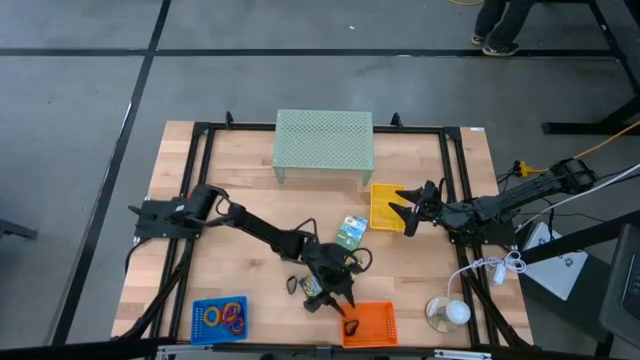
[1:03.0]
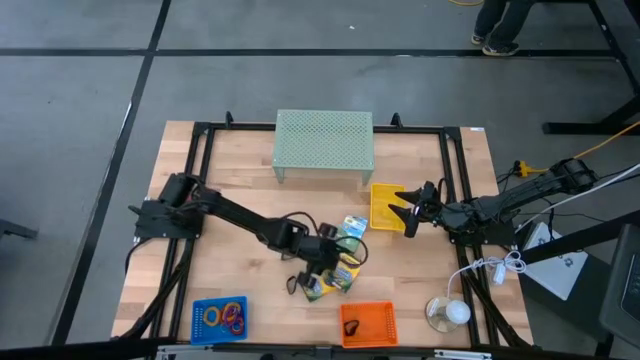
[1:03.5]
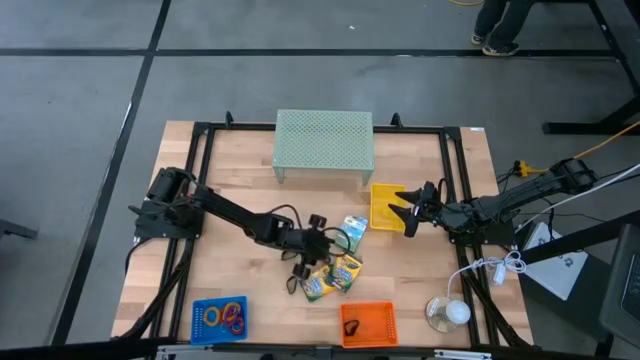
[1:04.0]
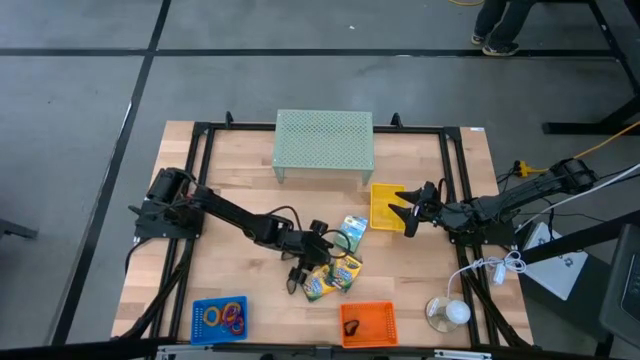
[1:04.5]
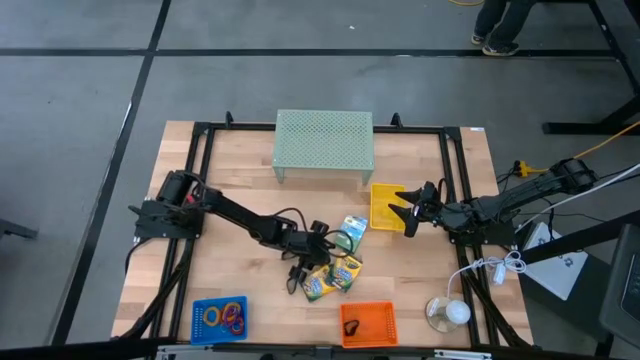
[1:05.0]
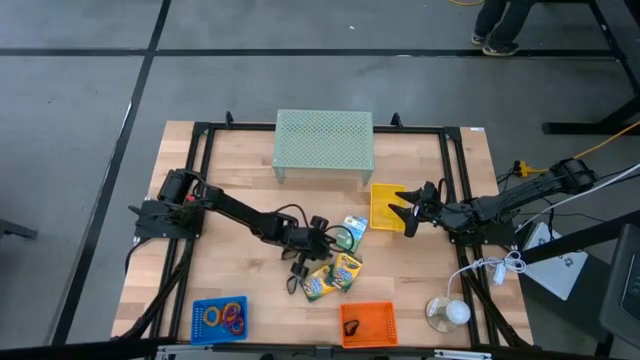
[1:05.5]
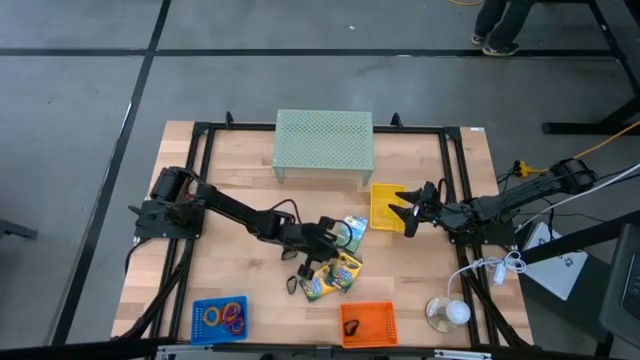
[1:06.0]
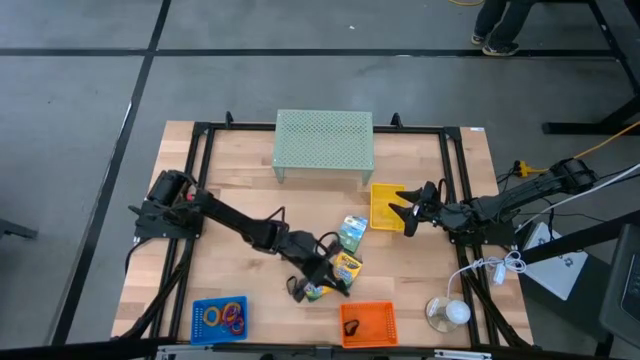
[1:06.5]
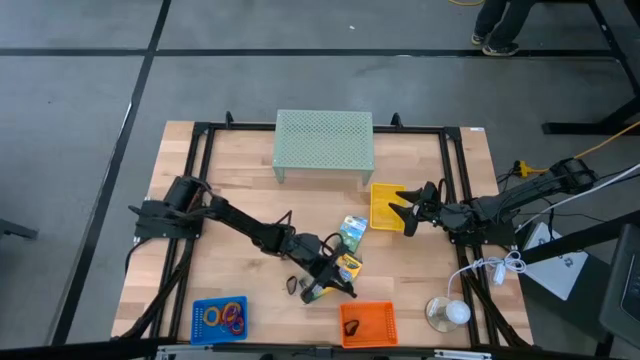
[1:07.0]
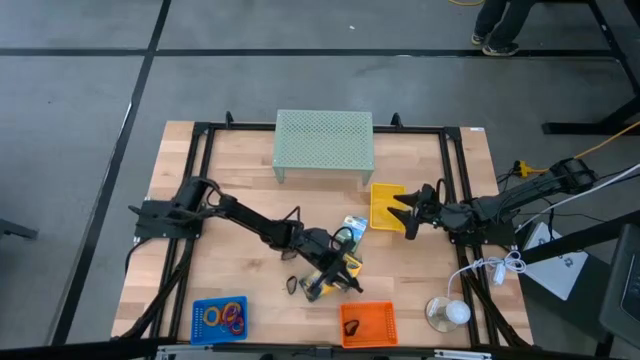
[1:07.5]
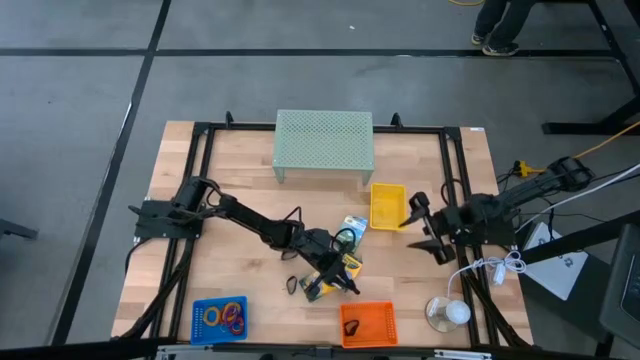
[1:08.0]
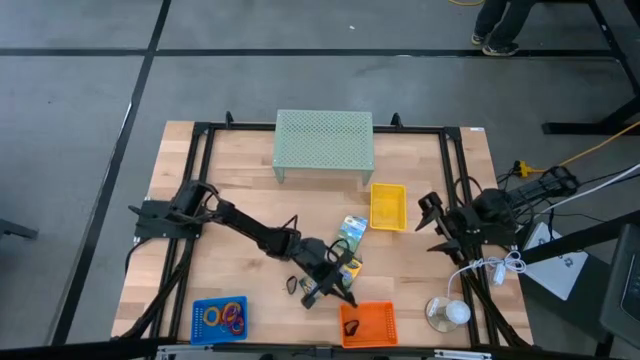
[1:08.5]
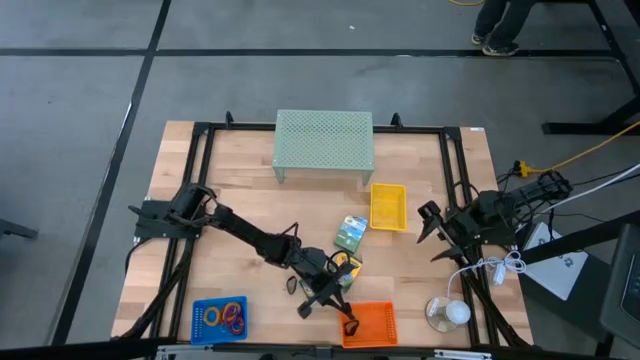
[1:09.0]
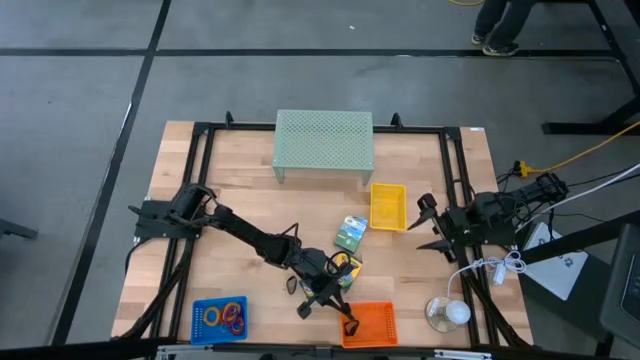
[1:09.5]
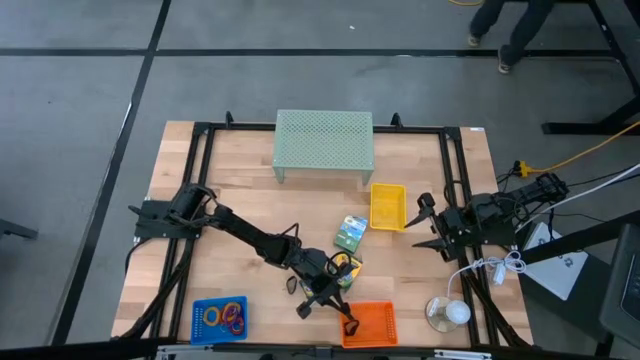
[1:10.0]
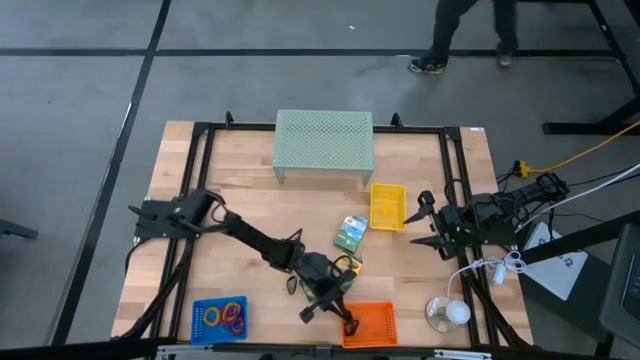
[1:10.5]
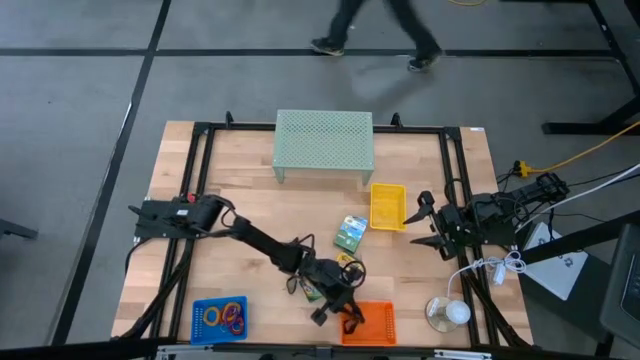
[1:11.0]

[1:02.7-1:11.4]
Task: Pick & Place Office Desk Supplies
Put the black rubber band into the orange bin

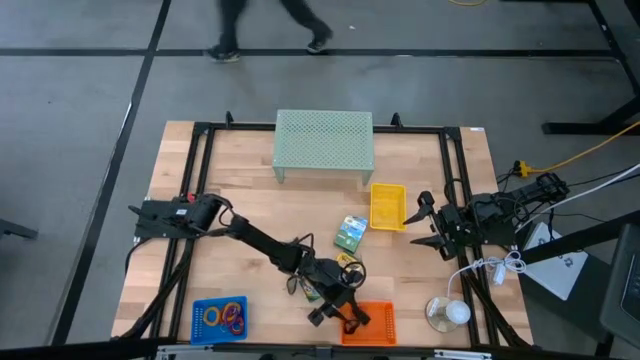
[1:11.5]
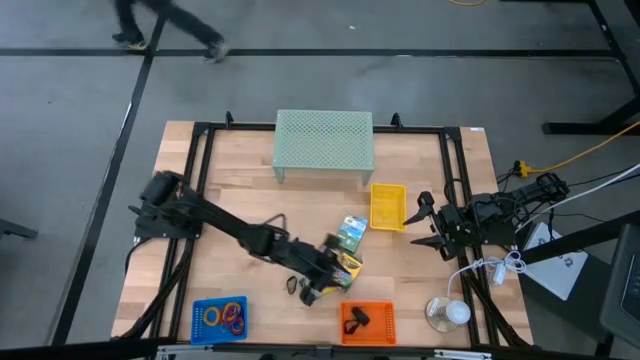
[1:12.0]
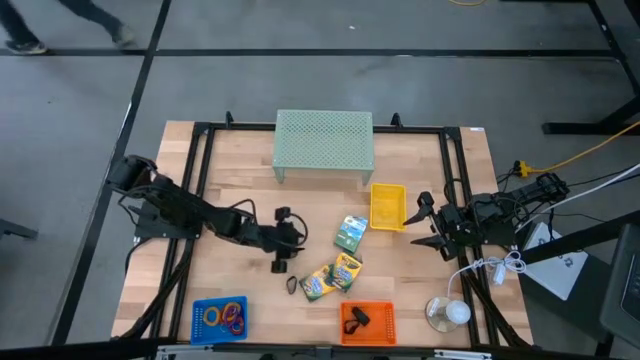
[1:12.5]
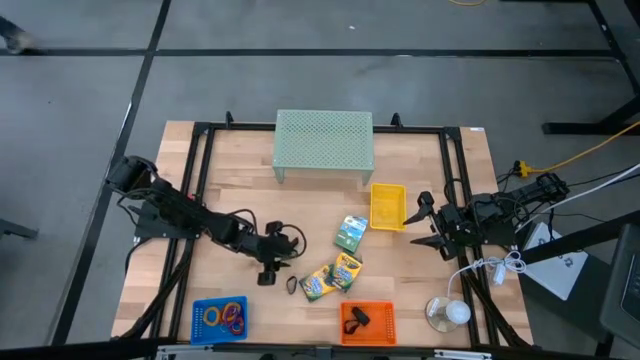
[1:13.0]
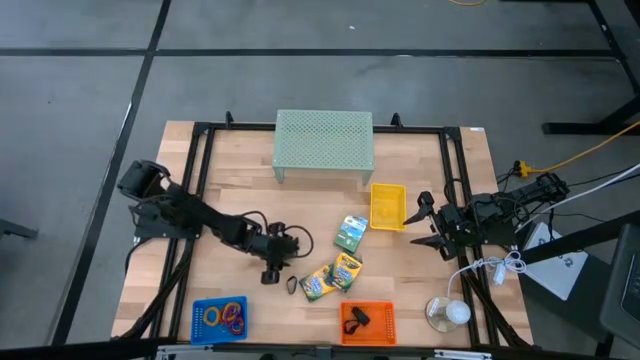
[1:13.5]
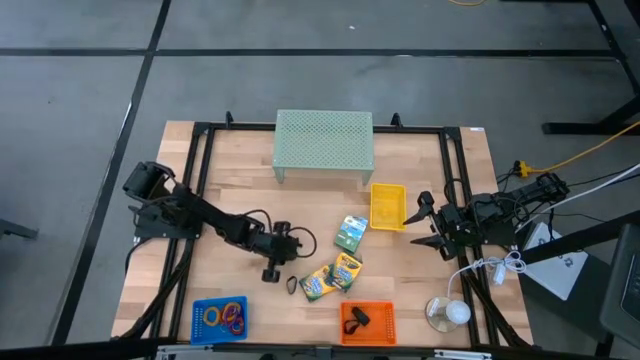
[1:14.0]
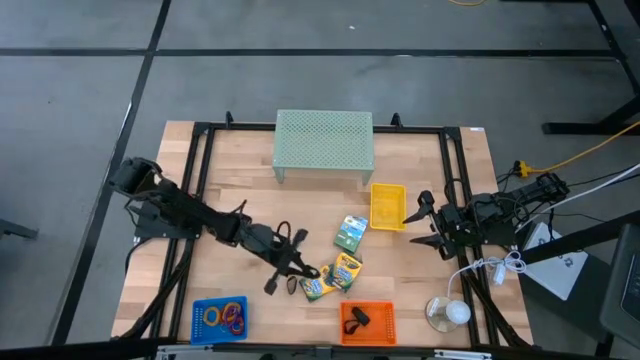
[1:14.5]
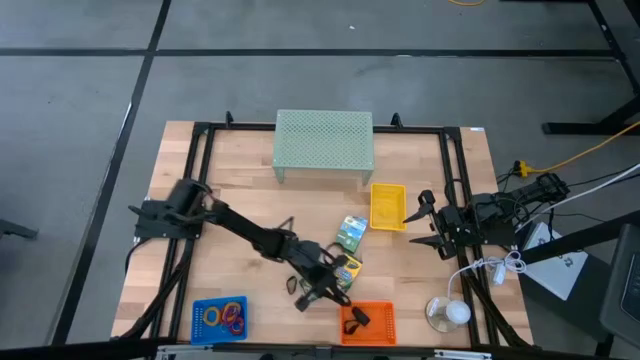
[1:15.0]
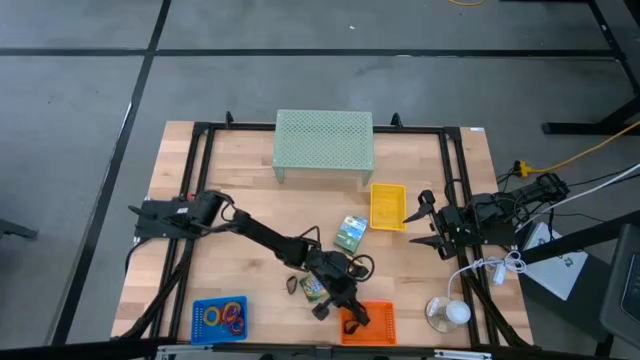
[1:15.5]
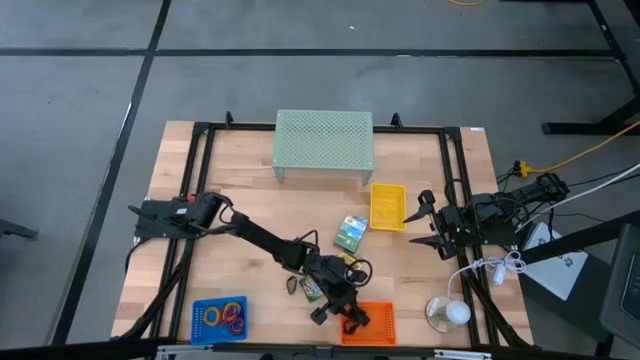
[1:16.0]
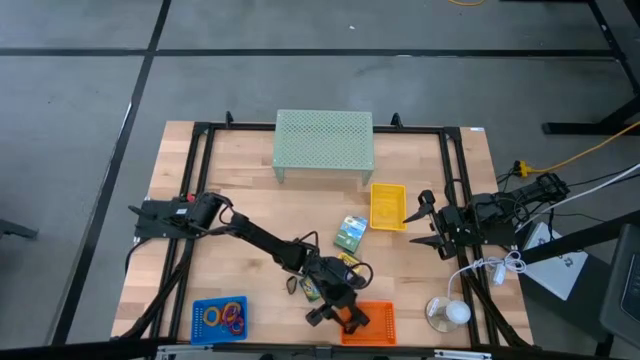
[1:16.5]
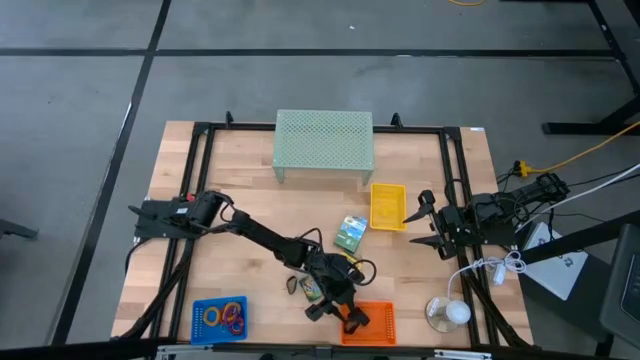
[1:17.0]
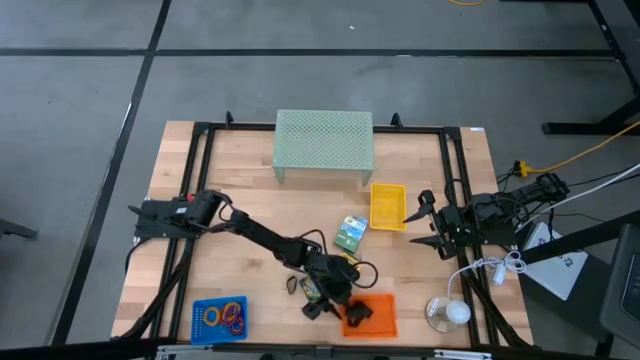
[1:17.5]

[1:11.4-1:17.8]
Put the black rubber band into the orange bin

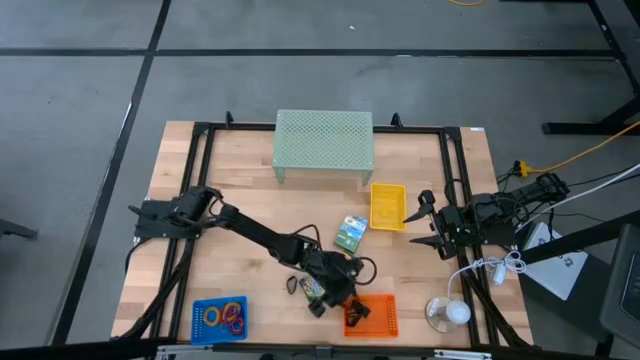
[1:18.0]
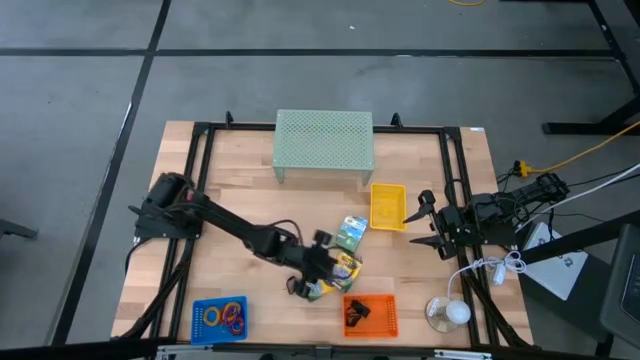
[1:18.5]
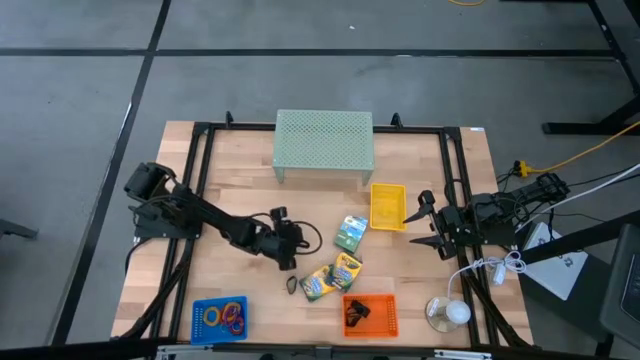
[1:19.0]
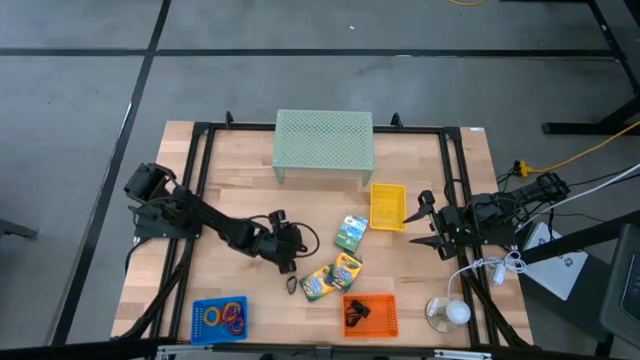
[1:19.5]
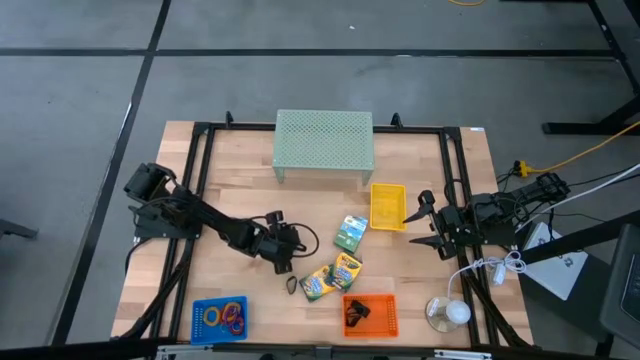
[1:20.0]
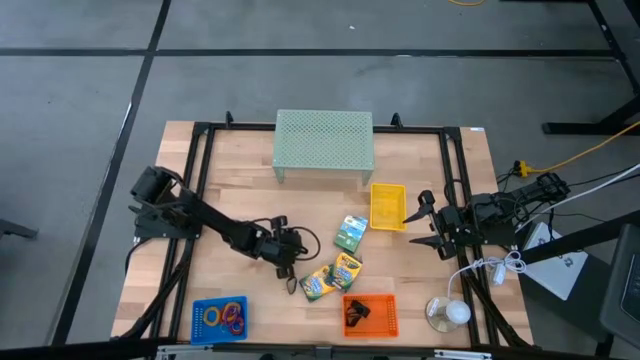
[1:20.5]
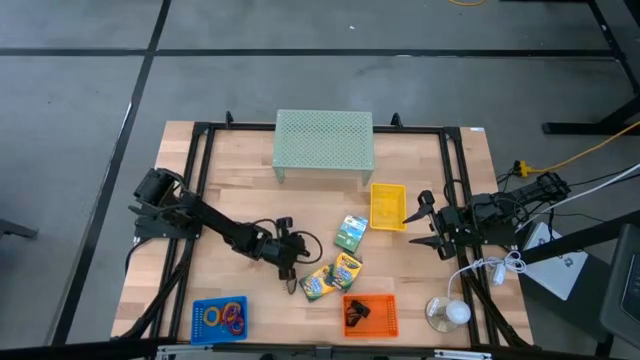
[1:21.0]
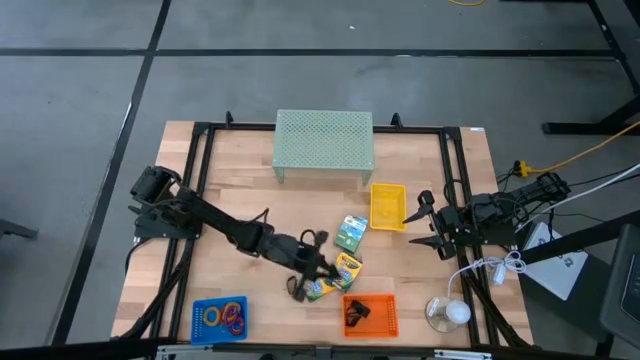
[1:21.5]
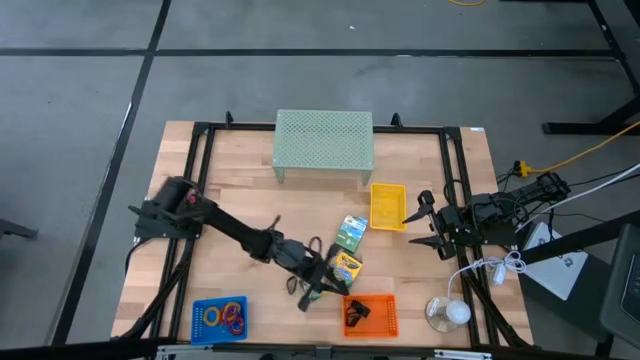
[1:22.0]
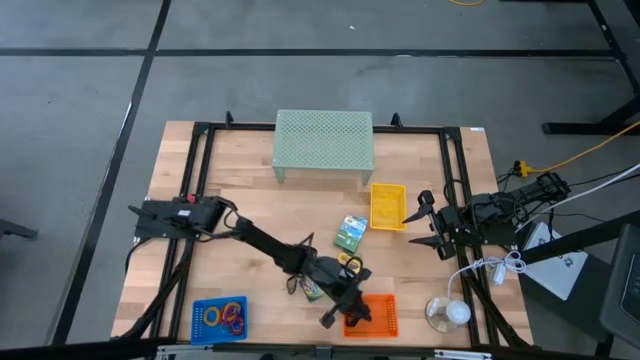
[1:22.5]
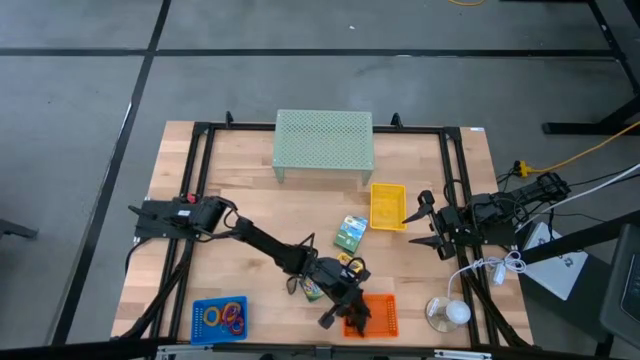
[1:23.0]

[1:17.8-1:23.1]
Put the black rubber band into the orange bin

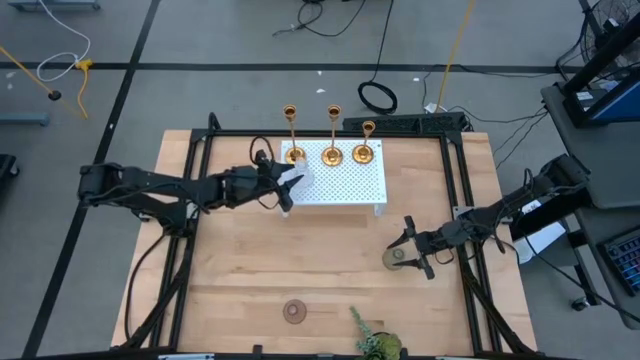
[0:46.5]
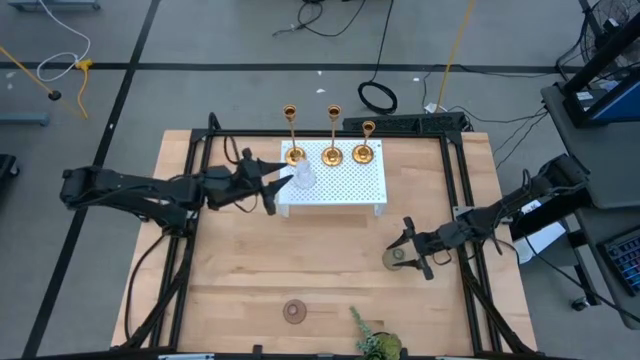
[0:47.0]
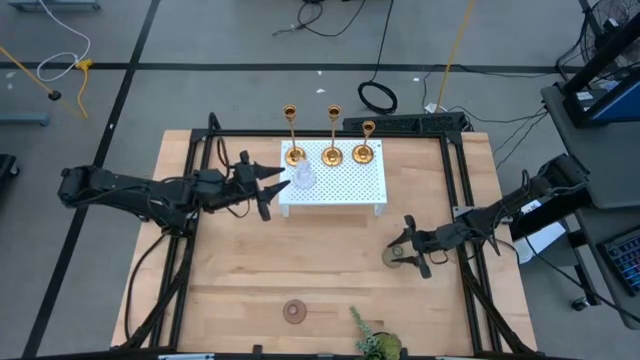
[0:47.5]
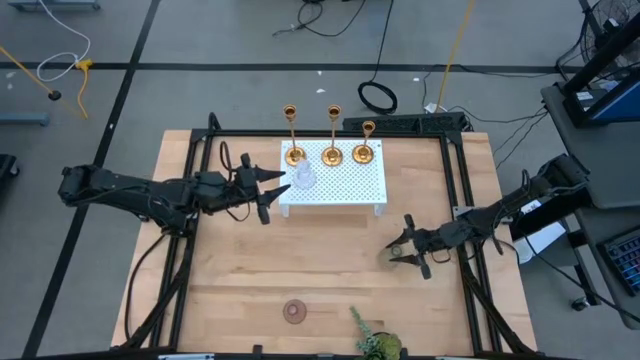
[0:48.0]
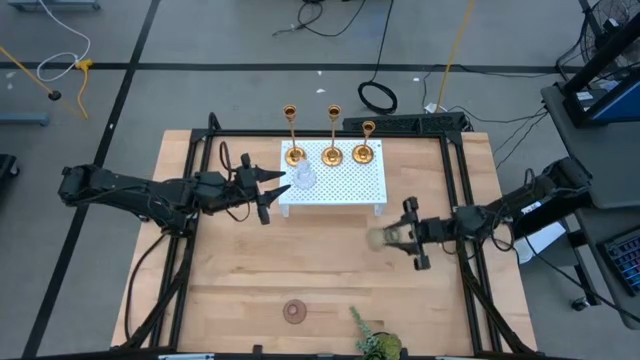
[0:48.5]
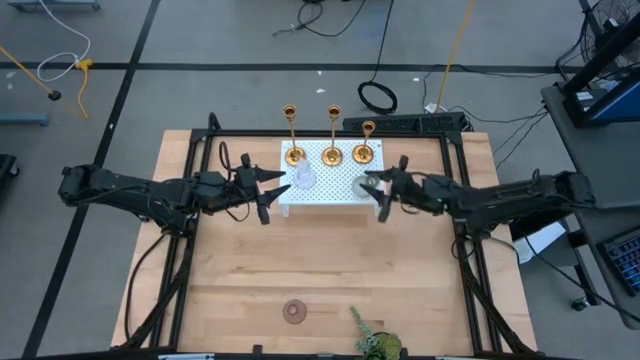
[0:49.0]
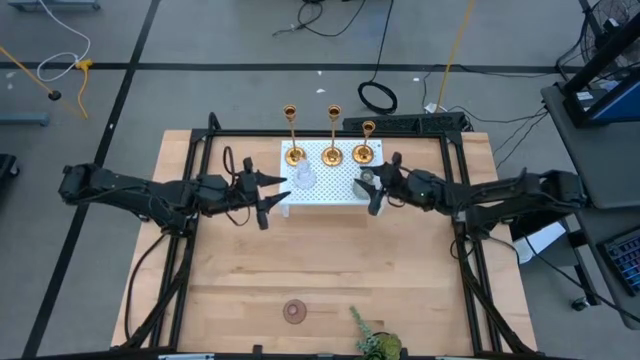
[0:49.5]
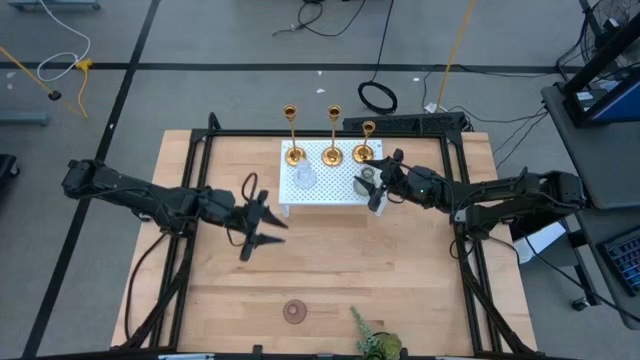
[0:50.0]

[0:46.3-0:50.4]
Task: Pick & Place candle stick holders
Put the green glass candle holder on the shelf
